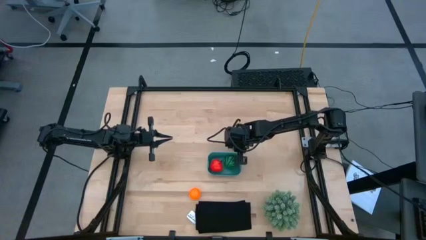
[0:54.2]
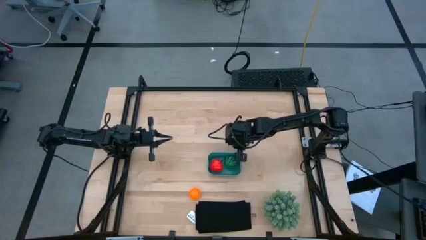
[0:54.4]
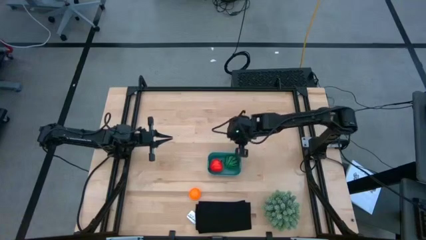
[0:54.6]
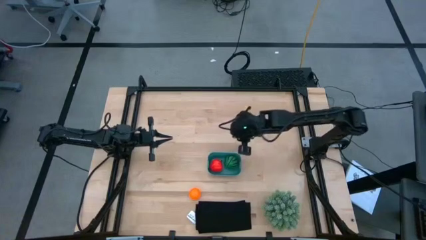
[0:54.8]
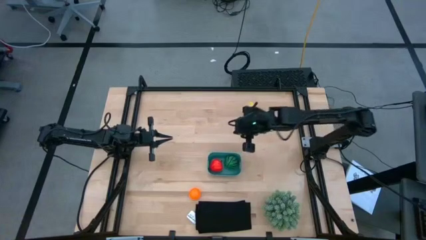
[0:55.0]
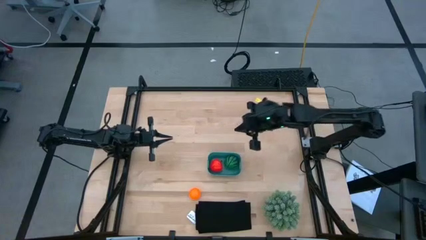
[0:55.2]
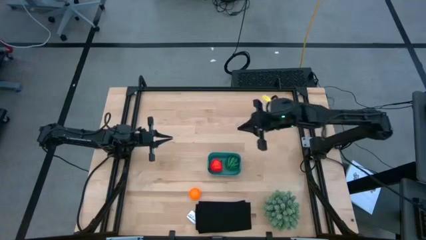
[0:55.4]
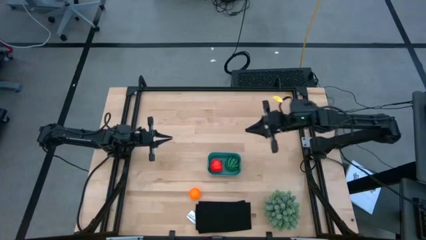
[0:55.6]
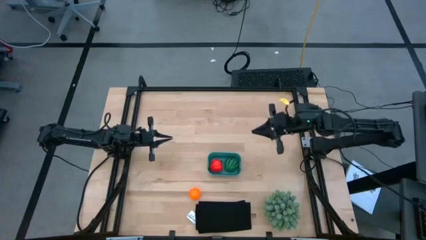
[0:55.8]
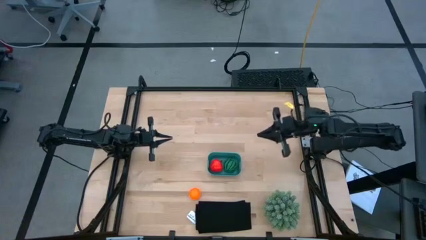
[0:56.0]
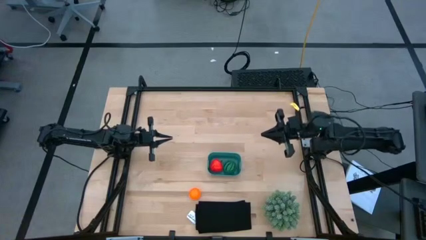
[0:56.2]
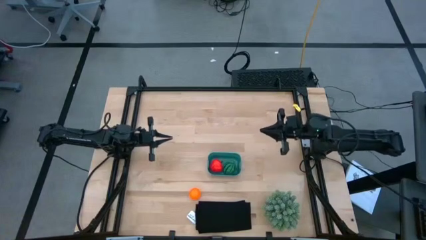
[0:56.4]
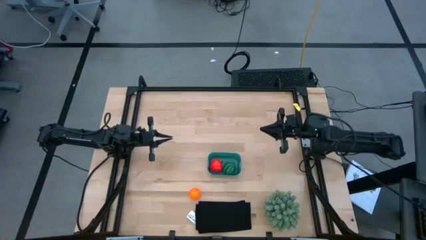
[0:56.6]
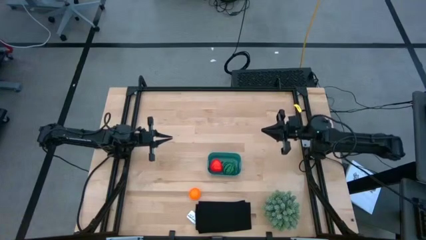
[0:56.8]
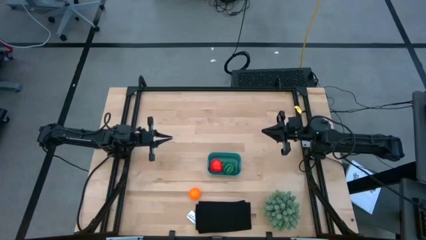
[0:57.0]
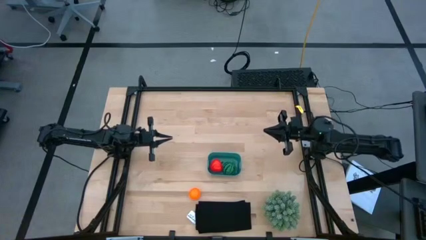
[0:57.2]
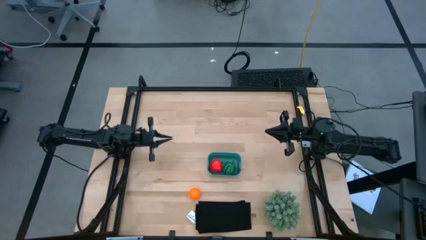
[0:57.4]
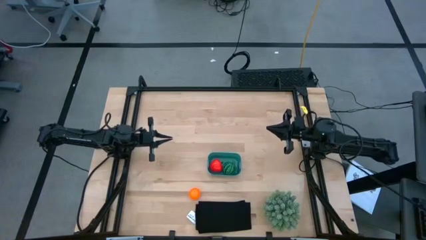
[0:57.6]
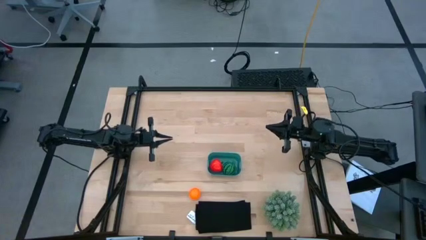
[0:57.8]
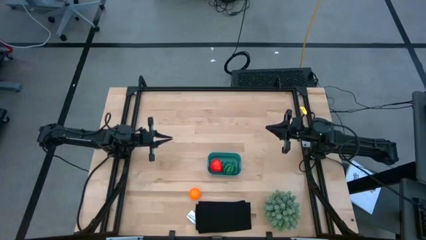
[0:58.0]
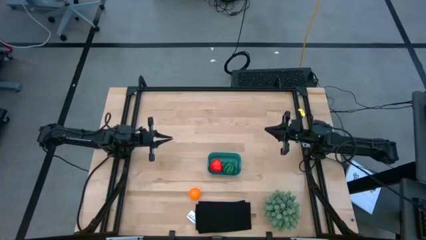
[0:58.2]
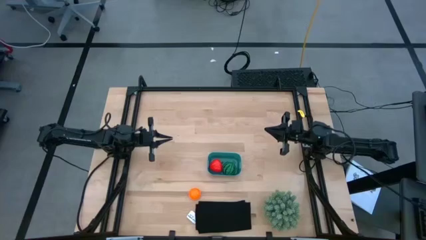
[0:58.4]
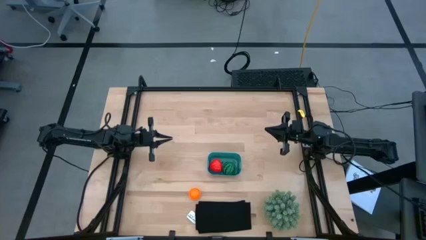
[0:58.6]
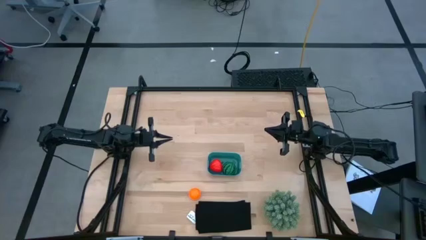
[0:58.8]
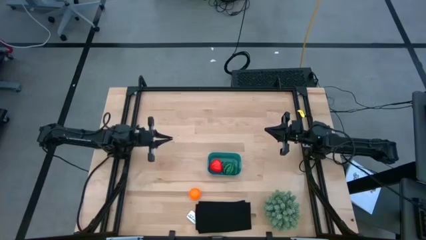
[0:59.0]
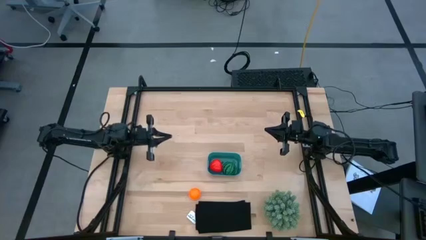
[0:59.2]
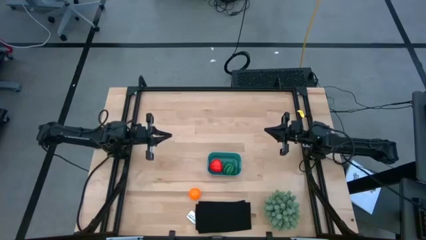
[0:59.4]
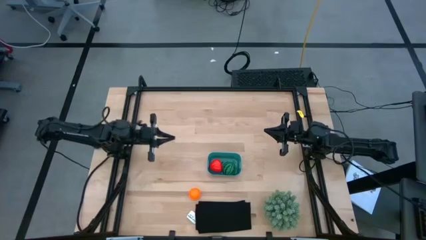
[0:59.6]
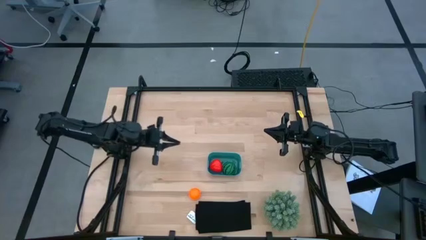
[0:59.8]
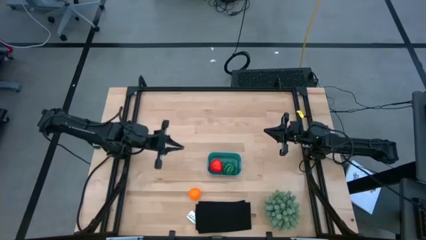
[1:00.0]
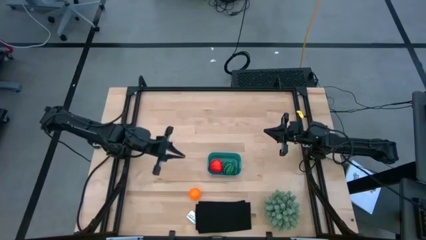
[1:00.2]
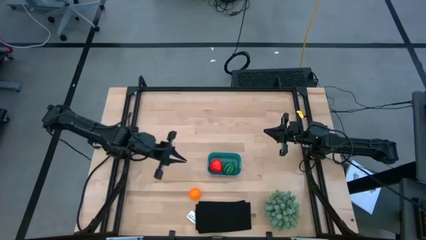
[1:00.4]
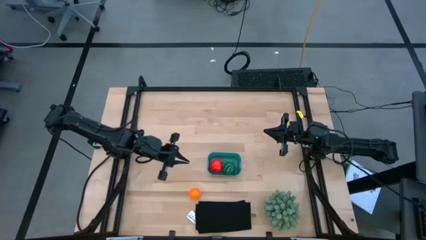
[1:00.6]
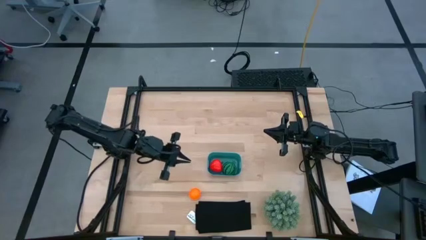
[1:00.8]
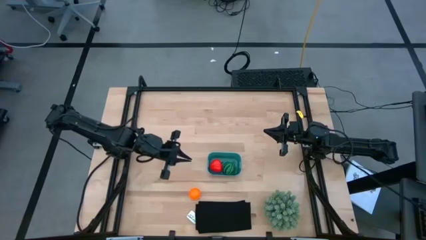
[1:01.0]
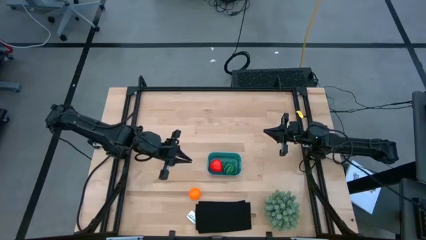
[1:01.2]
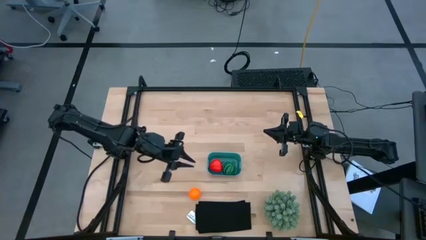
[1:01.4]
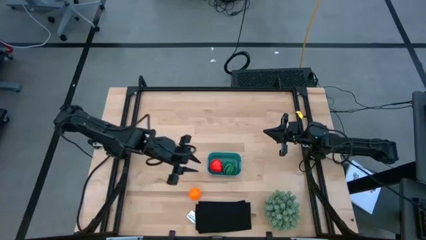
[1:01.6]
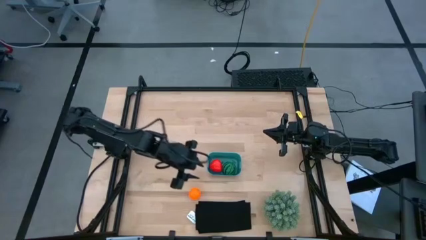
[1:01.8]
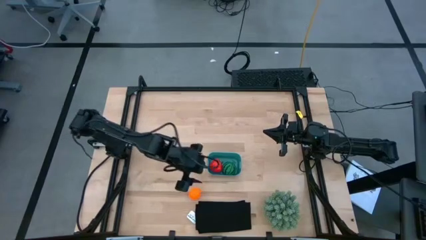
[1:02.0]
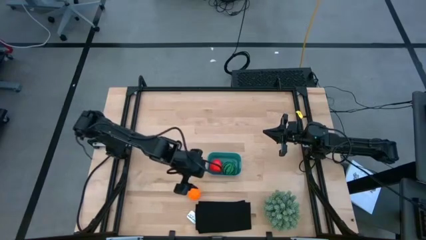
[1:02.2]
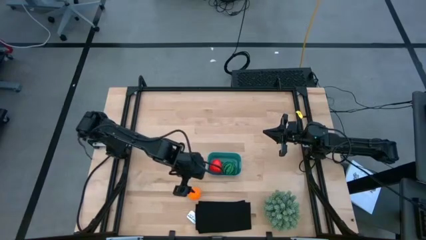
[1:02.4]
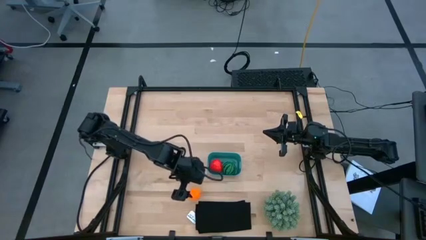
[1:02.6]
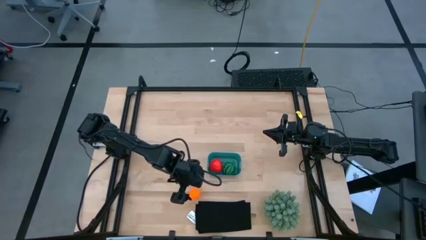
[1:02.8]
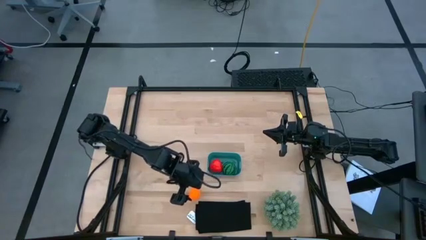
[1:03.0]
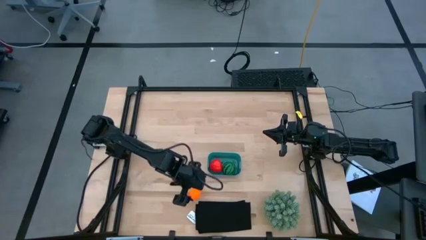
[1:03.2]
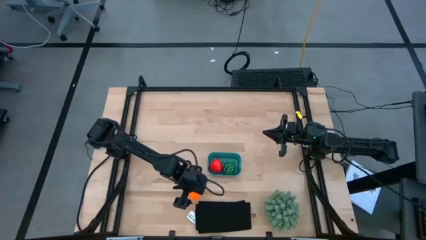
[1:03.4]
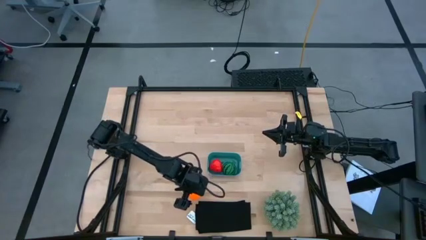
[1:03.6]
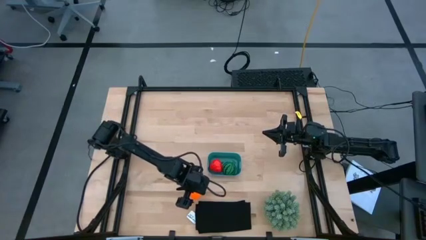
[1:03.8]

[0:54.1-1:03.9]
Task: Pick and placing Produce into tupperware
Put the orange pumpkin into the blue container

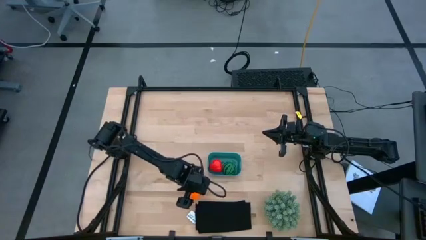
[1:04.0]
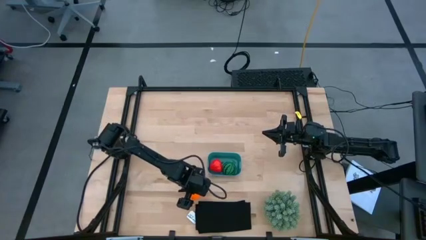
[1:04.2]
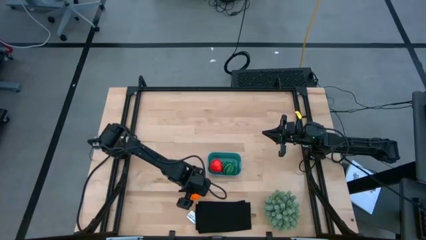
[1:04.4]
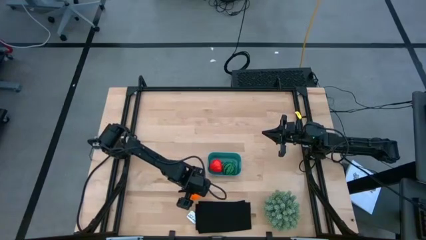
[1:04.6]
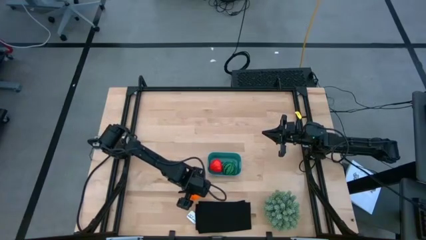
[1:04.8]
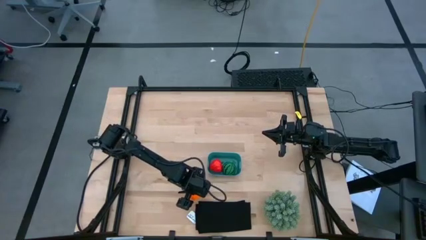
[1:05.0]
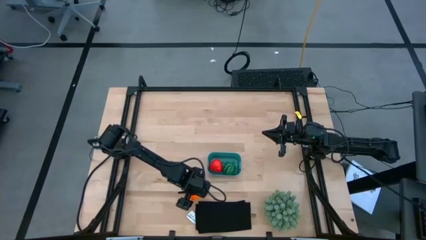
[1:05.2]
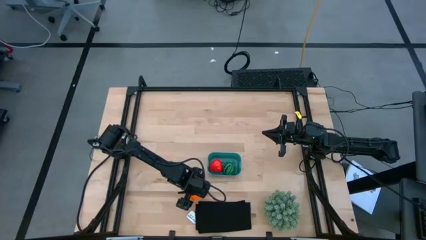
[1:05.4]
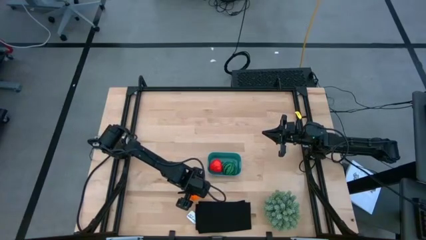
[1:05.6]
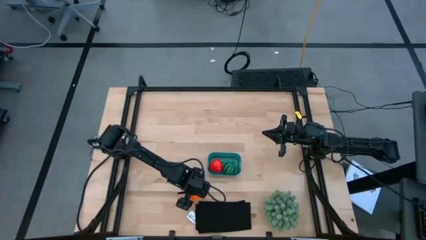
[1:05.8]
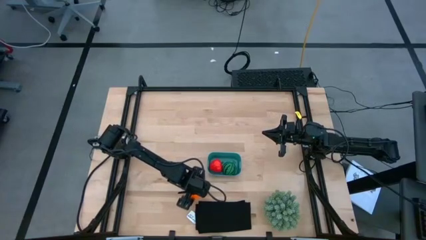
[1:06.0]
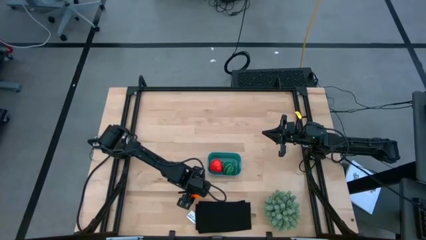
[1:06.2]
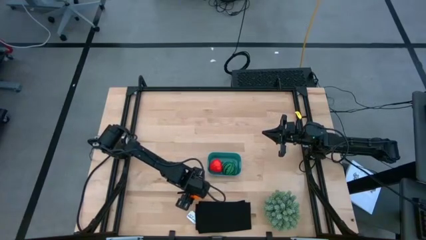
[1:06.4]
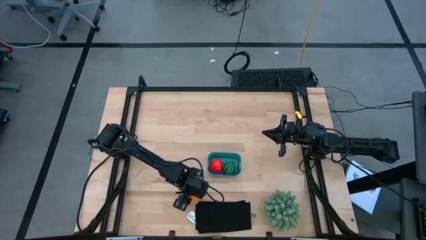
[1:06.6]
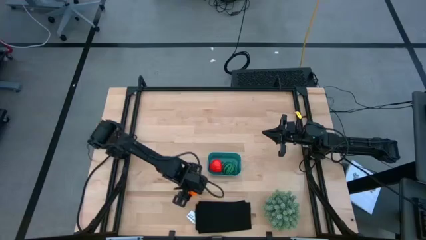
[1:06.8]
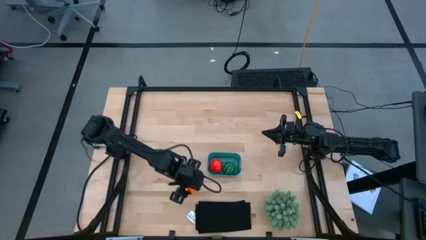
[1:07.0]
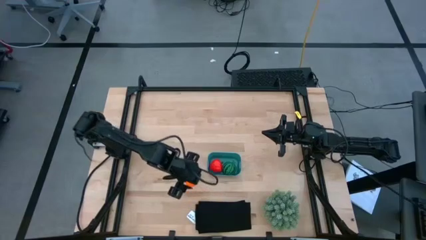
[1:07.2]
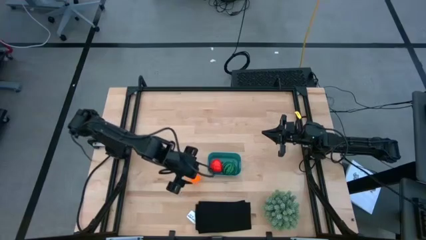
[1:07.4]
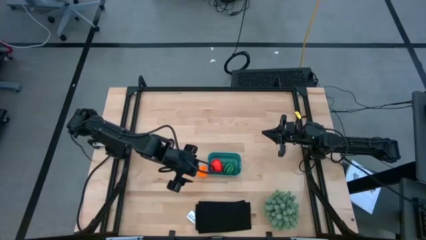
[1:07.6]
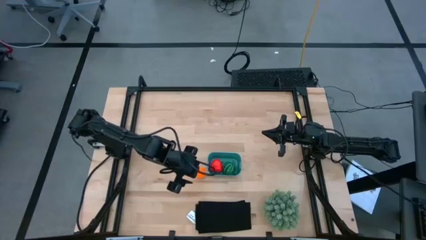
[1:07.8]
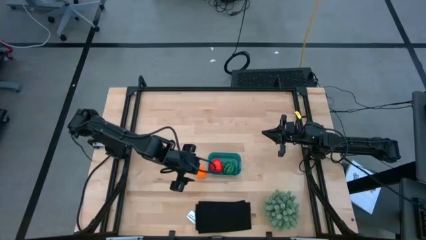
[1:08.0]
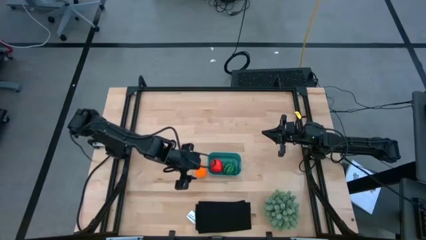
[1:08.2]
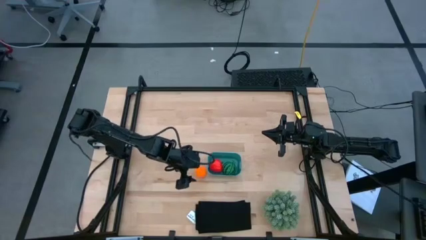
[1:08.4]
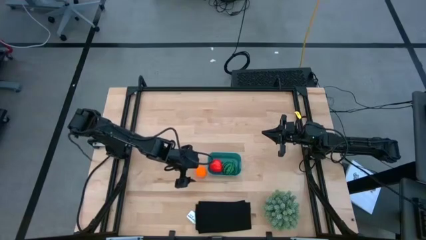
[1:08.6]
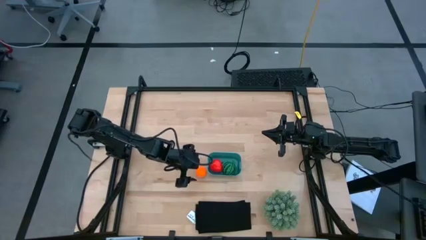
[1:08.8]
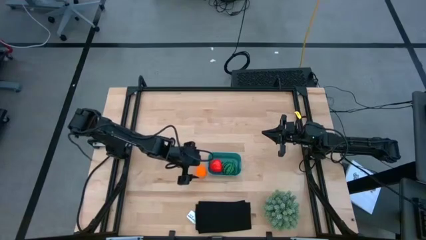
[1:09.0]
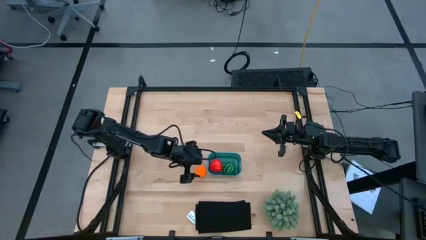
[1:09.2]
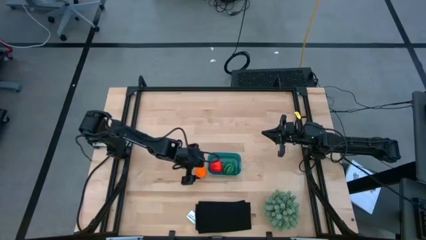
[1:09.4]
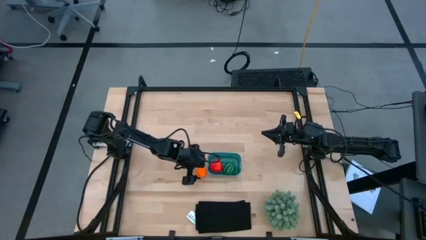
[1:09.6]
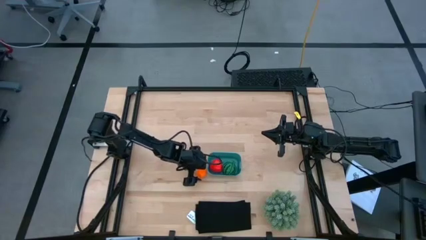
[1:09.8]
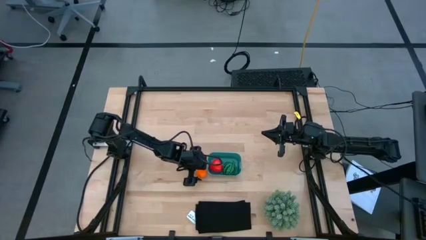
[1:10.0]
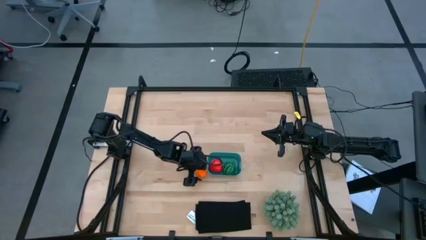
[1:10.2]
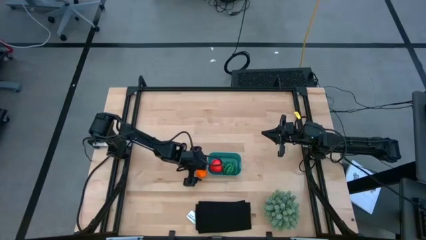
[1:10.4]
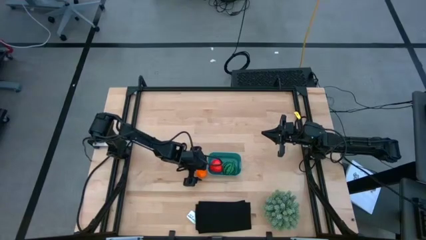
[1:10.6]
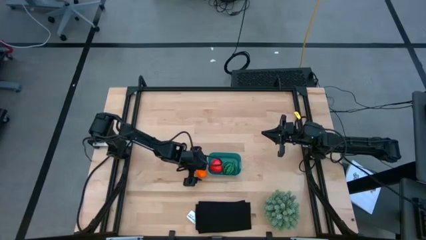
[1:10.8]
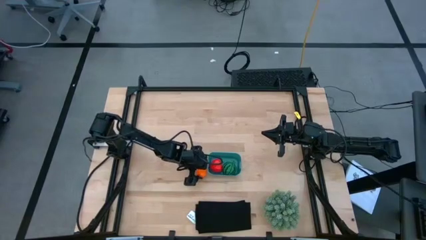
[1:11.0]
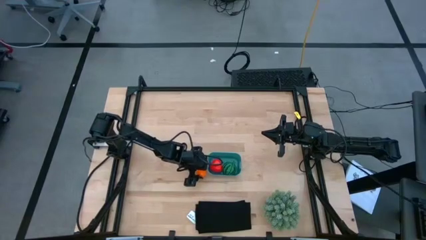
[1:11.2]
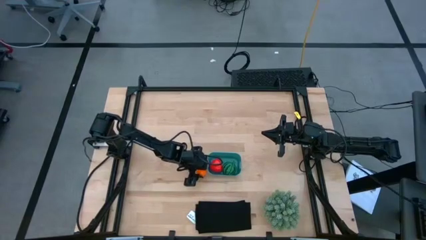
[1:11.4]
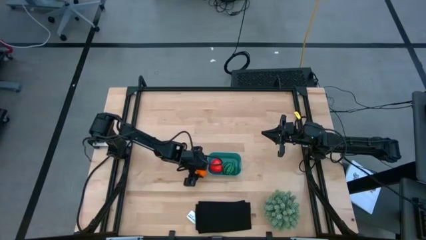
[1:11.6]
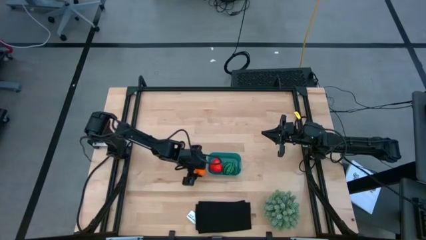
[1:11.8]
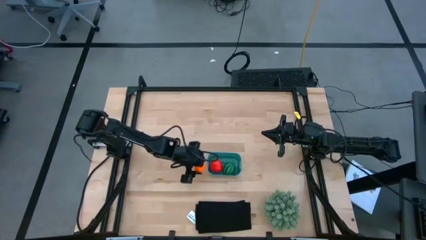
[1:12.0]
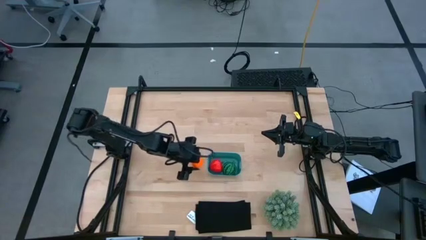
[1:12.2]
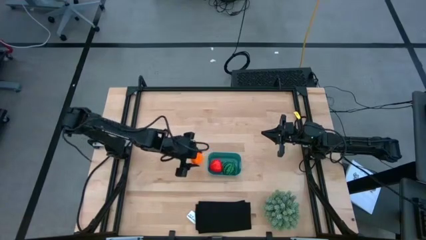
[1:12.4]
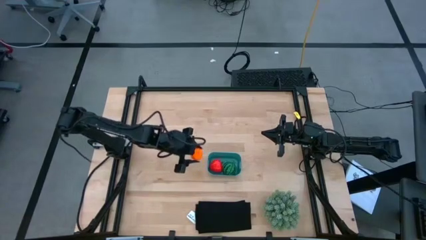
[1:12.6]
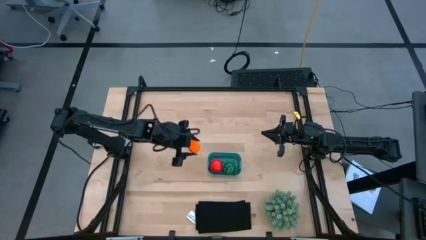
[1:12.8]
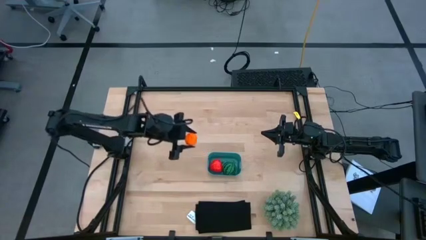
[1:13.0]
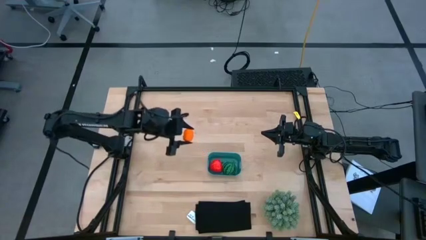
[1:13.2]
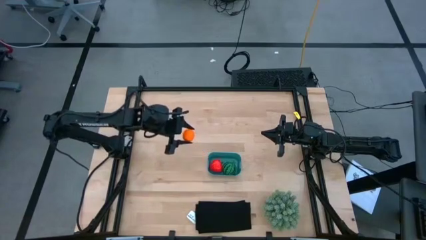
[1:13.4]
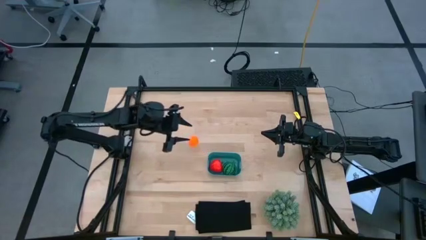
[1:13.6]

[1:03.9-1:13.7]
Put the orange pumpkin into the blue container
